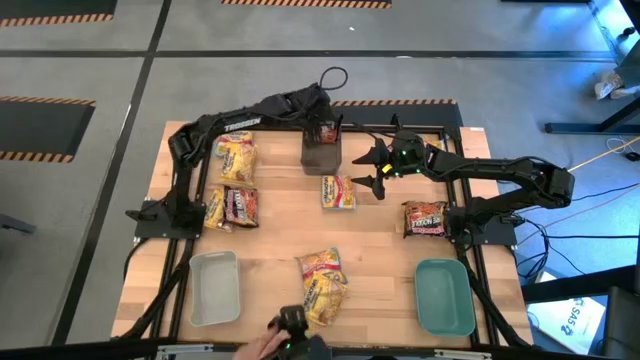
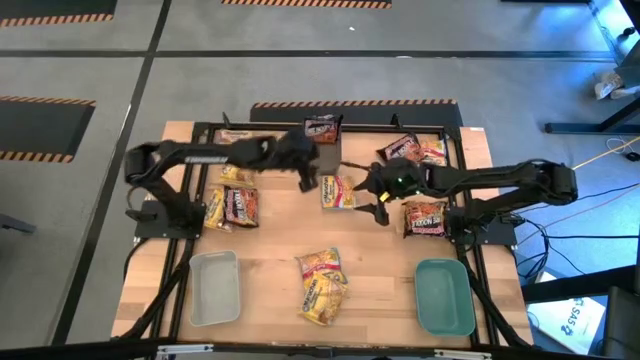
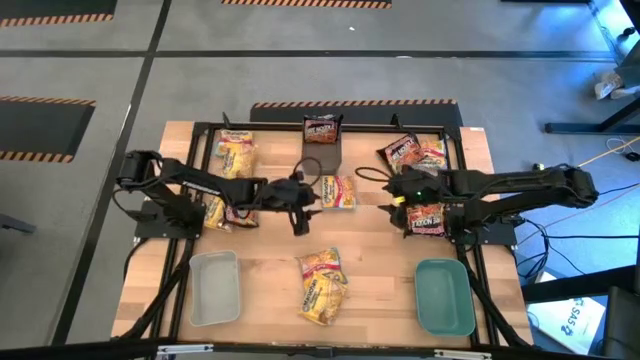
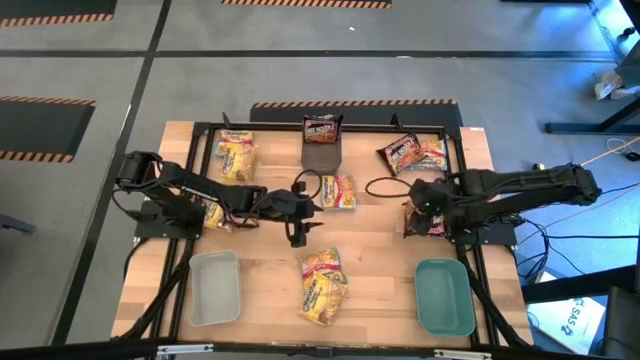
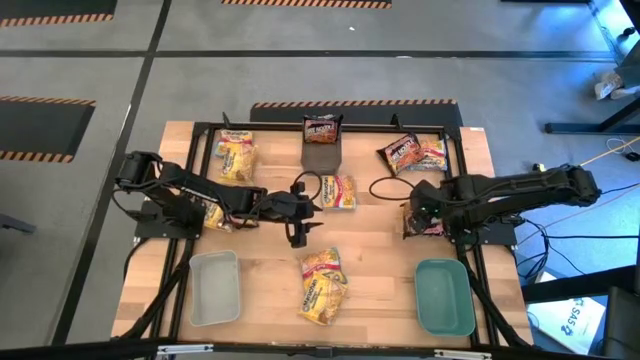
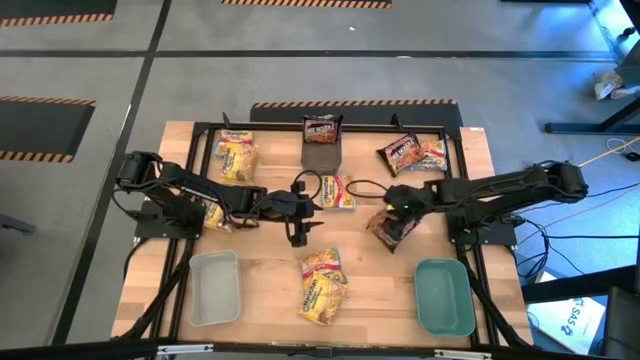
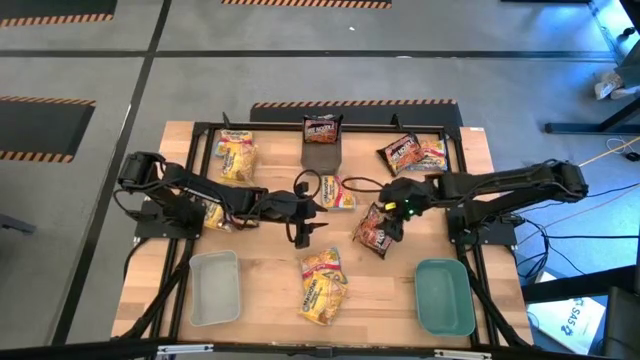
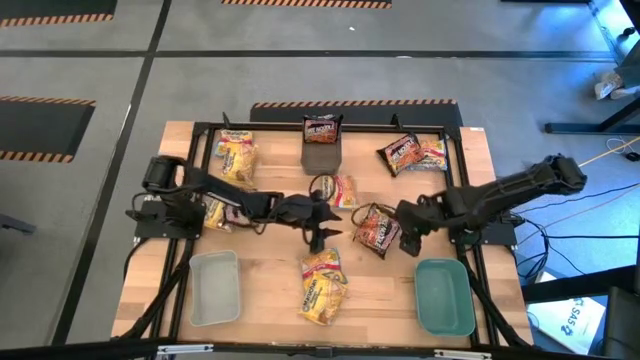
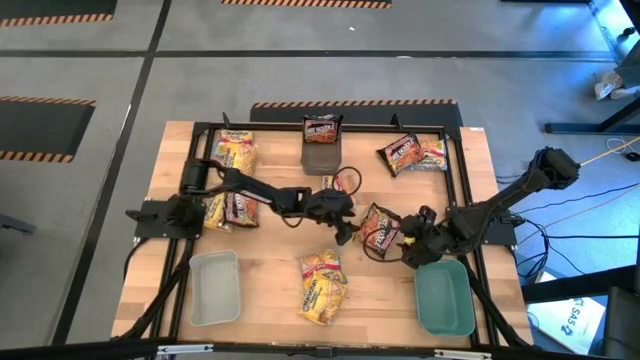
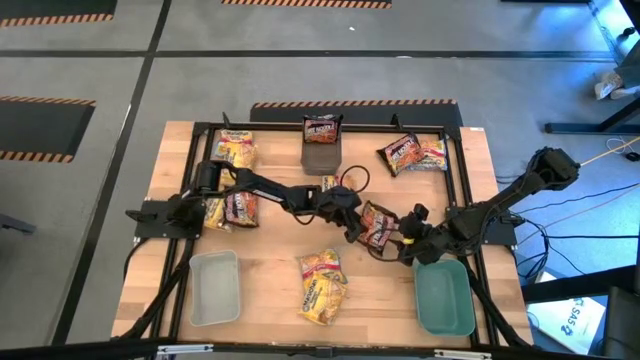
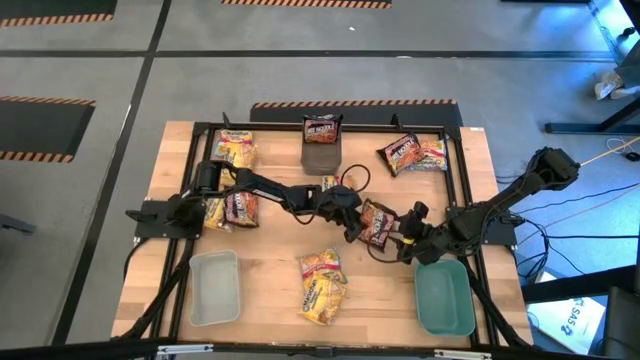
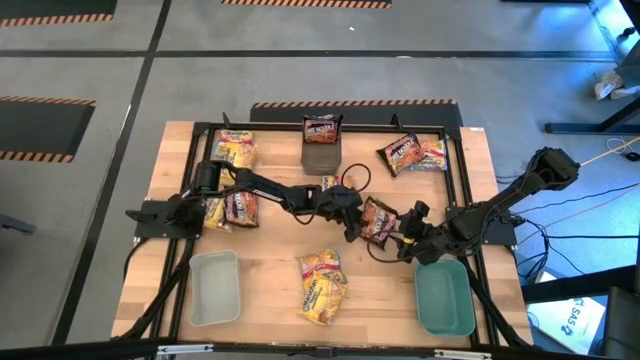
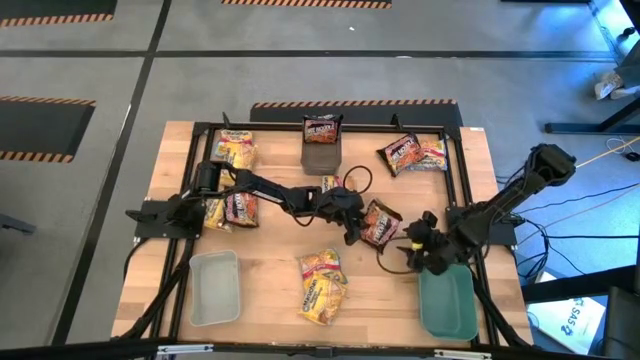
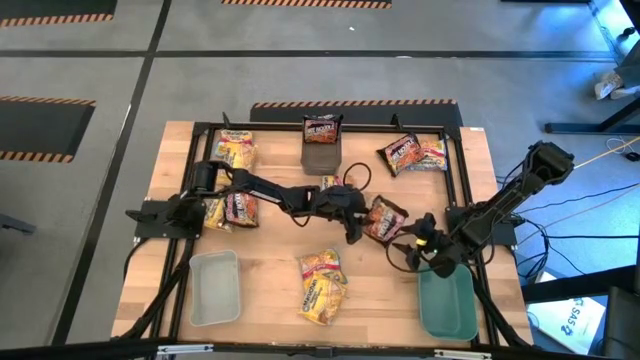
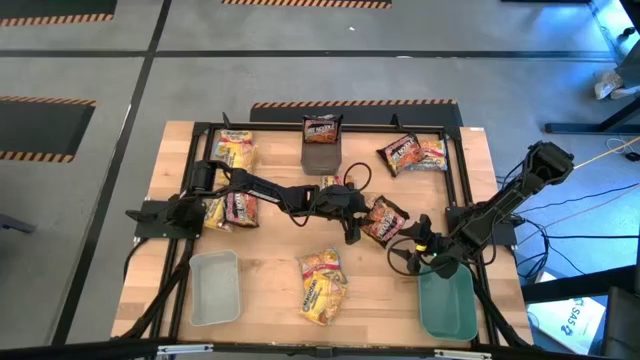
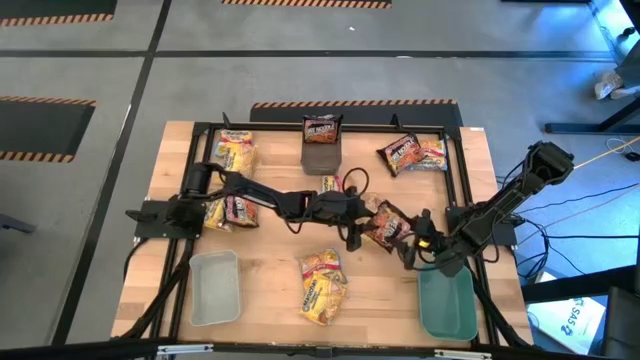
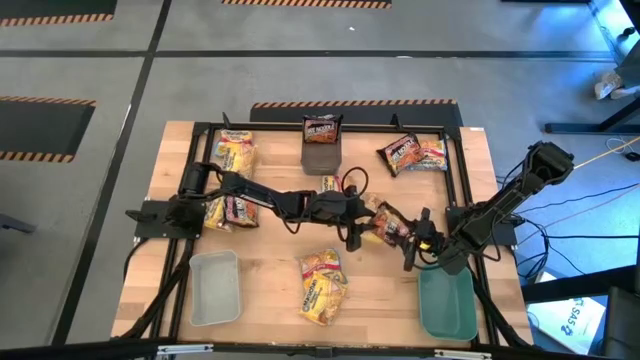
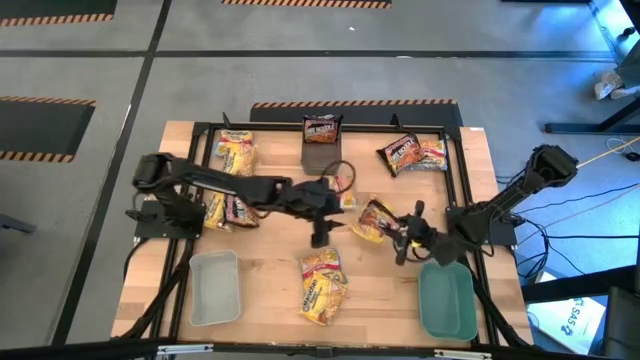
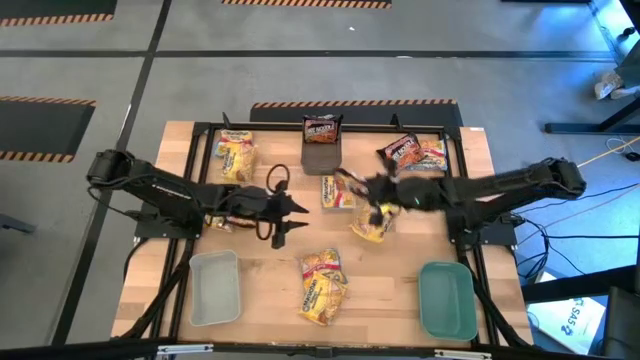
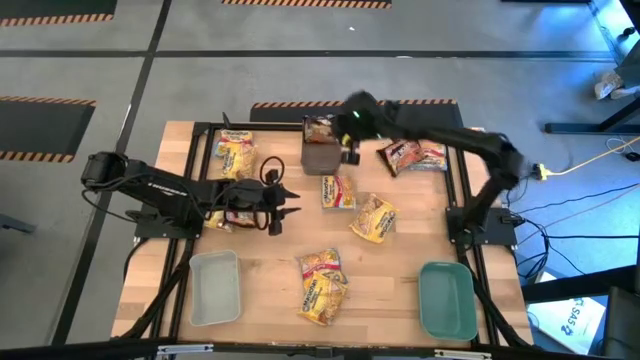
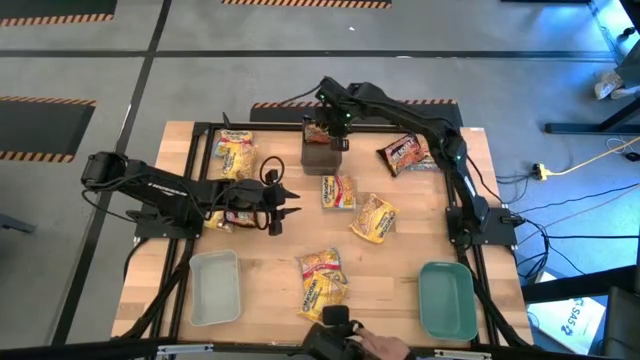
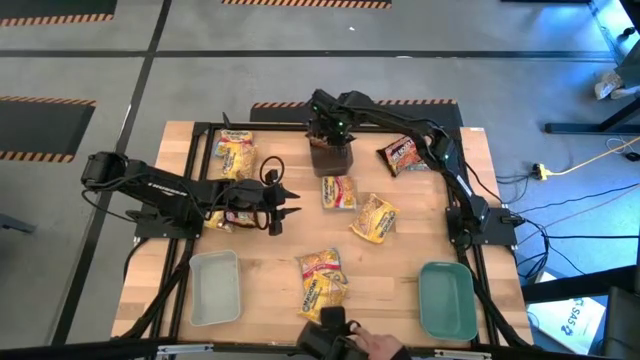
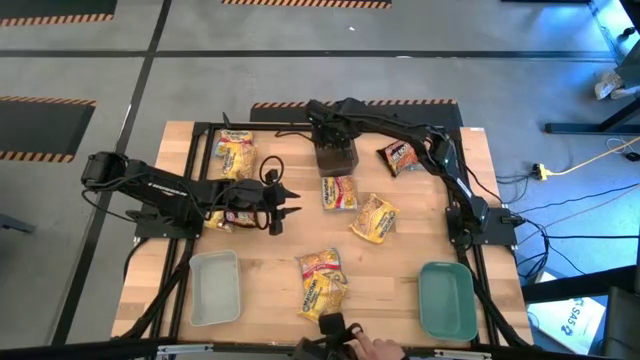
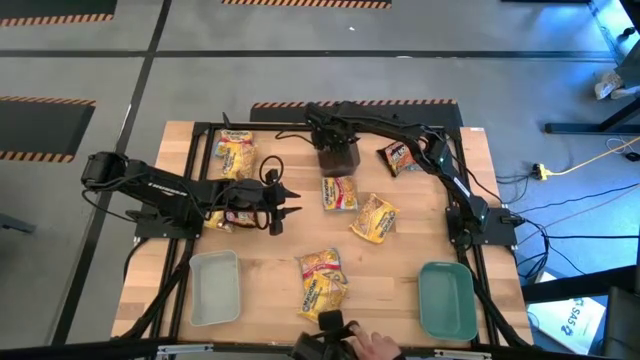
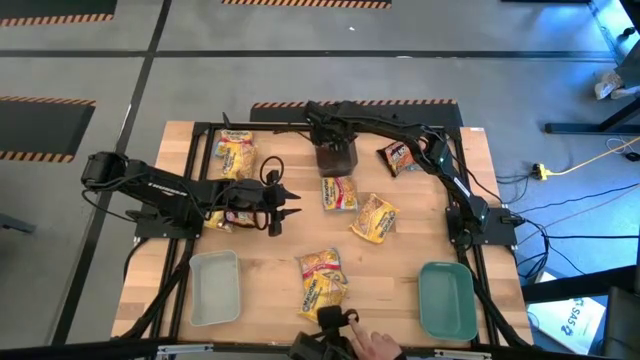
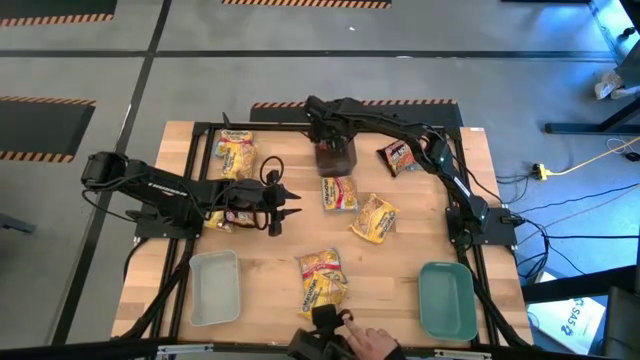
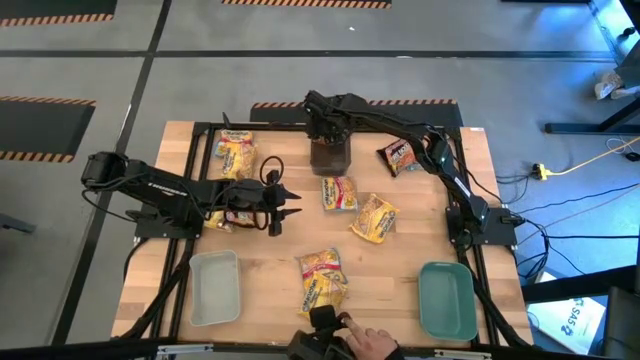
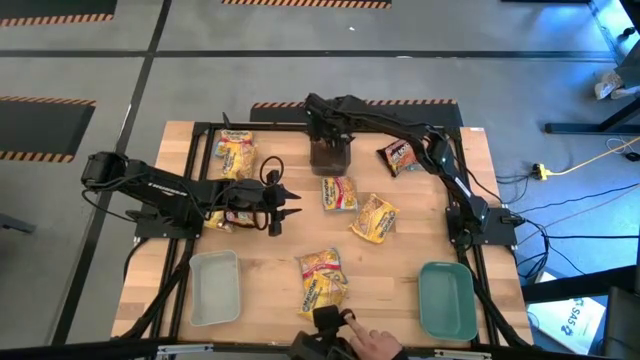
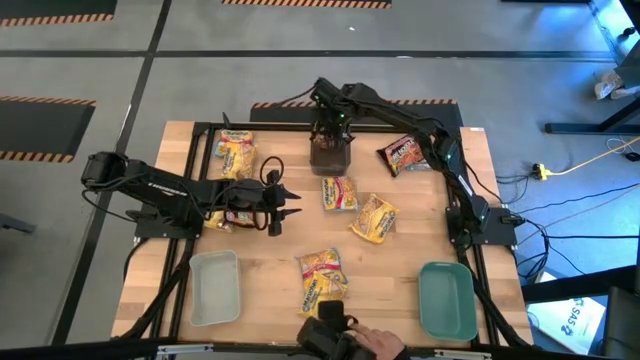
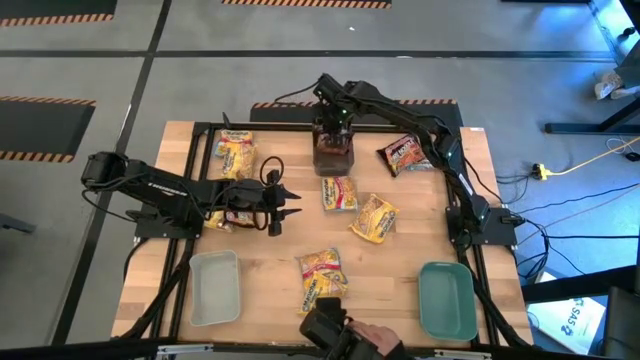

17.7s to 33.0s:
Task: Sort Maruchan noodles
Put the bottom right black noodle pack into the black bin

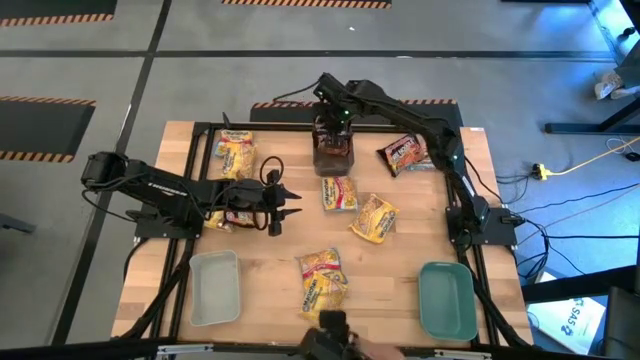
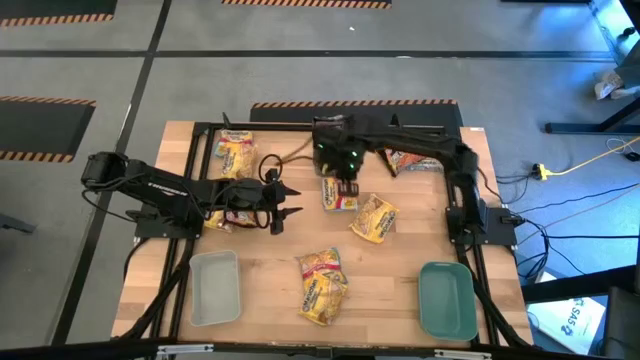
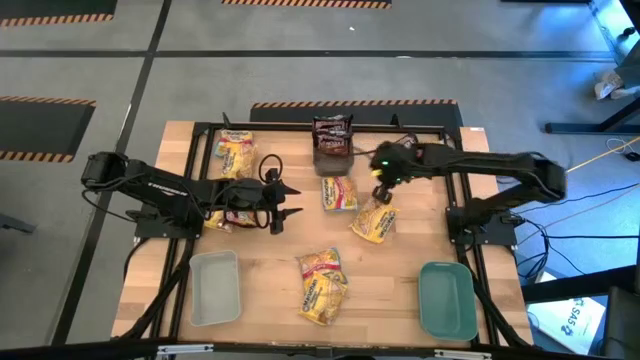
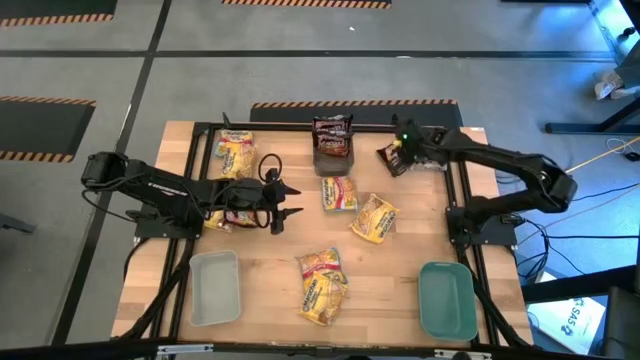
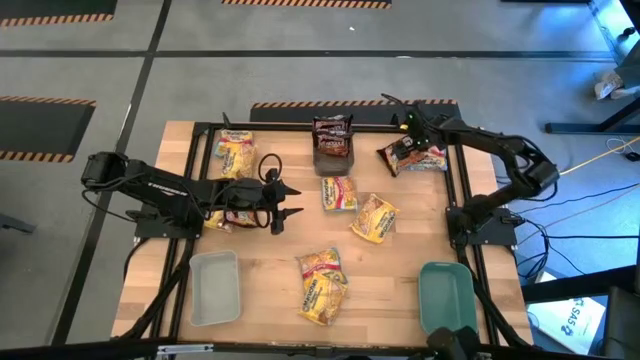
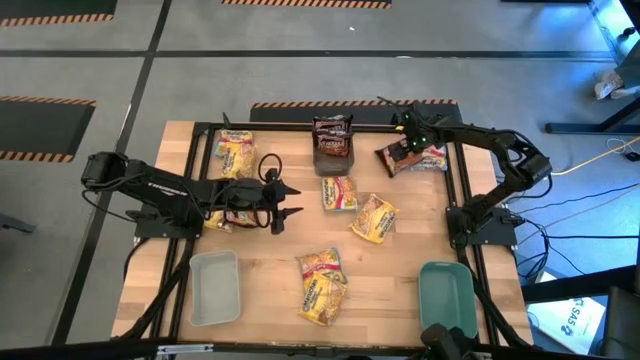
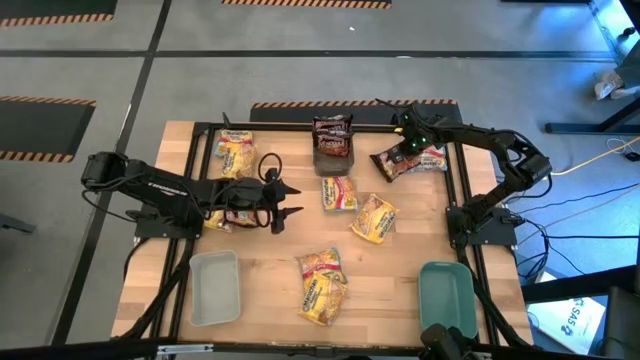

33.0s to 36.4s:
Put the top black noodle pack into the black bin

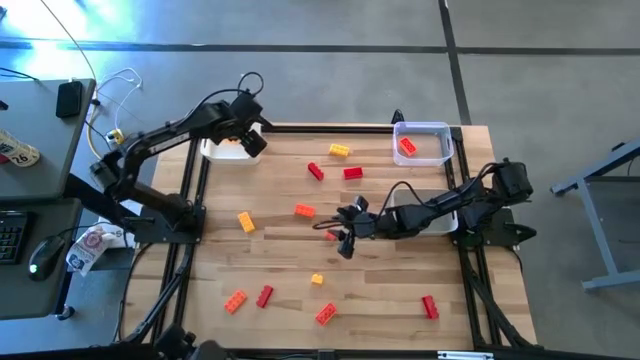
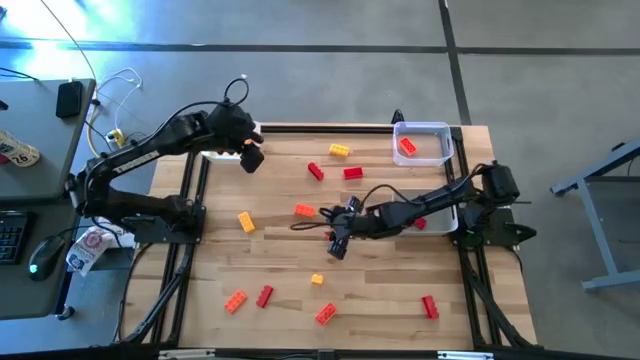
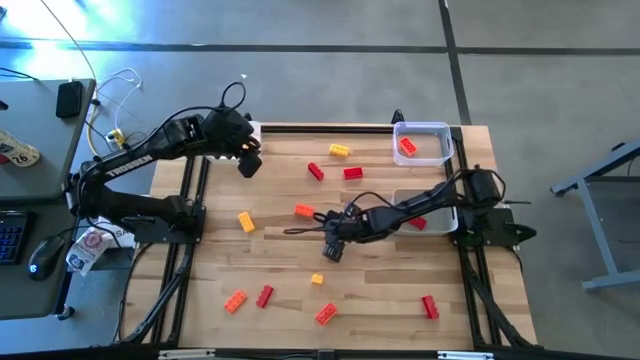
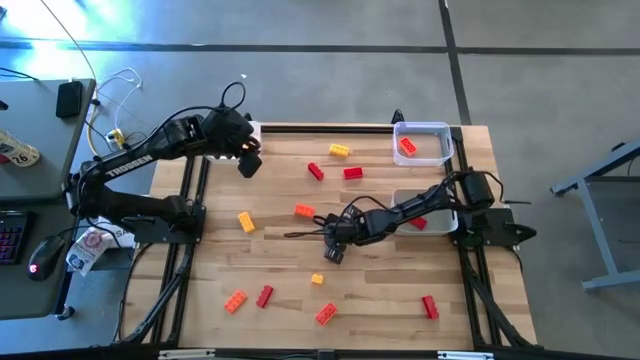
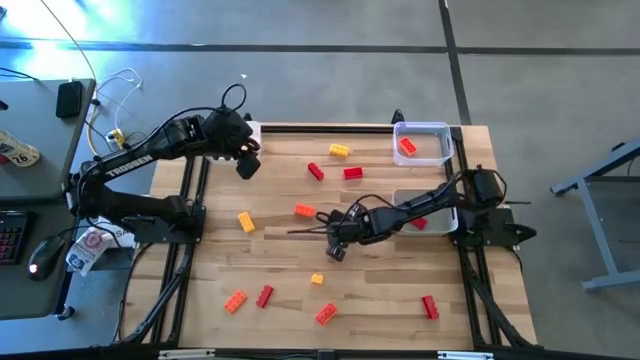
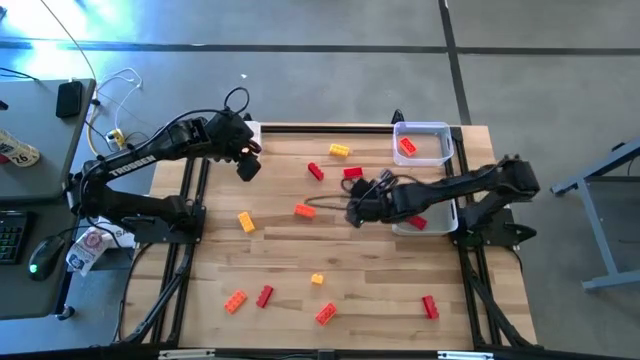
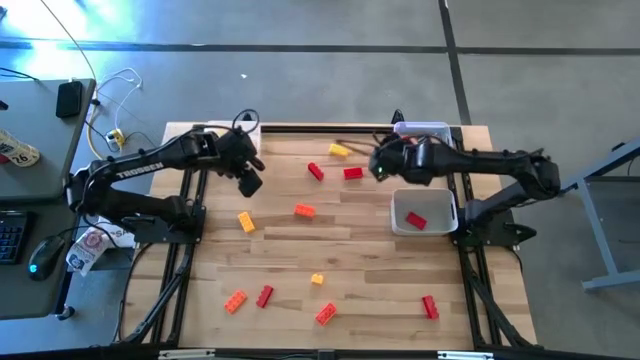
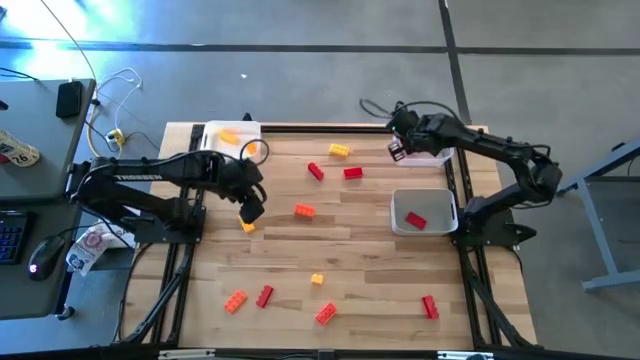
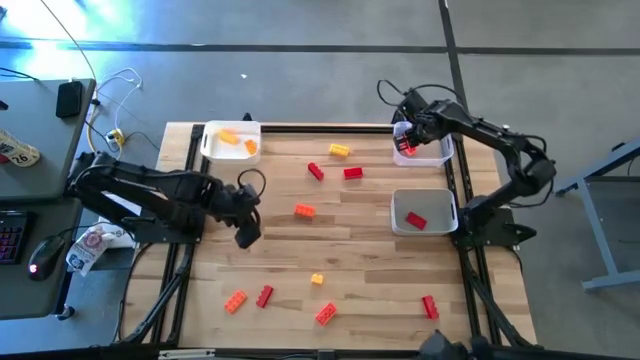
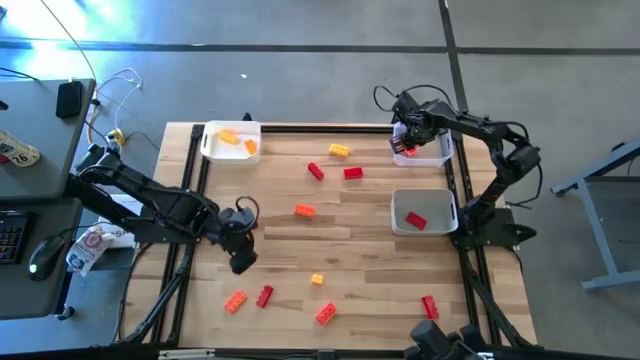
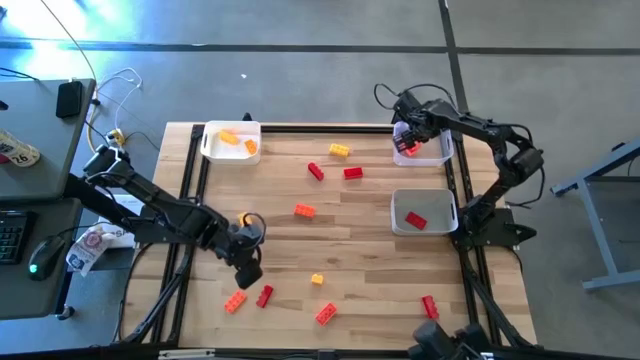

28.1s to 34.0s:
Task: Sort & place blocks by color
Put the orange game piece into the transparent bin
